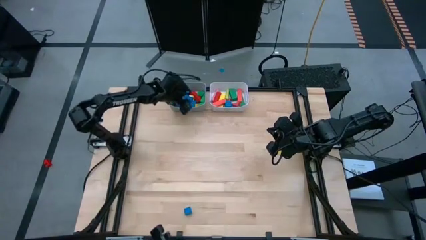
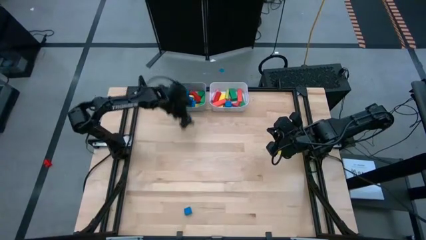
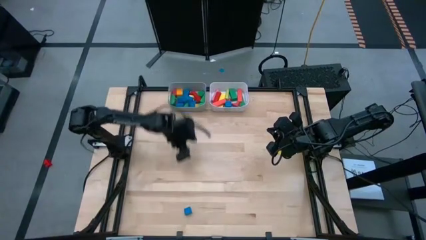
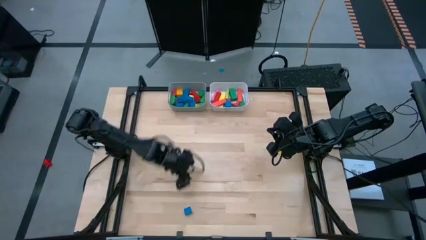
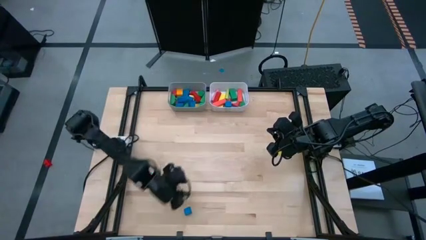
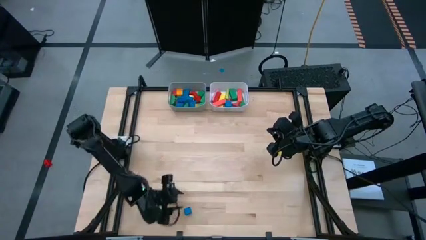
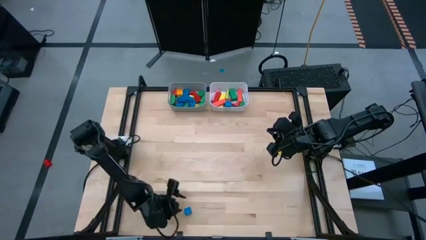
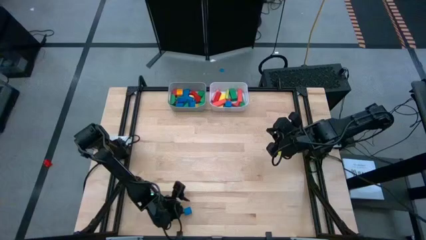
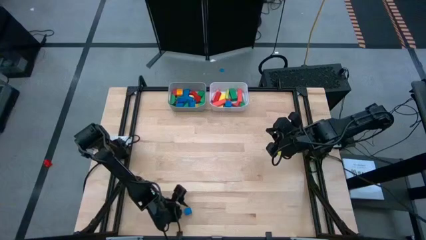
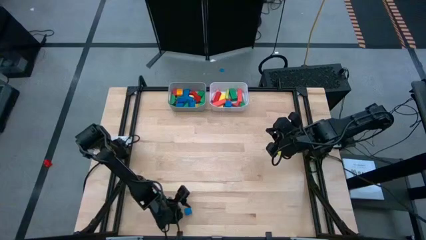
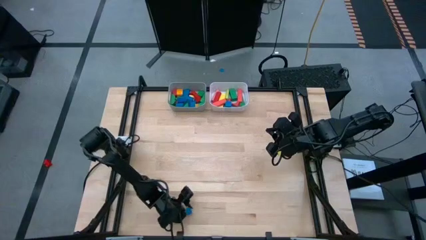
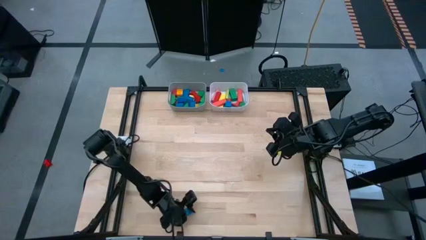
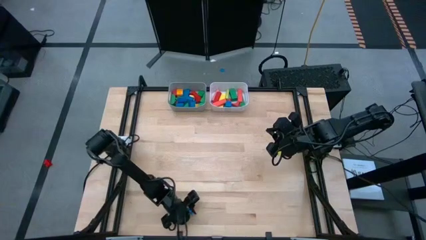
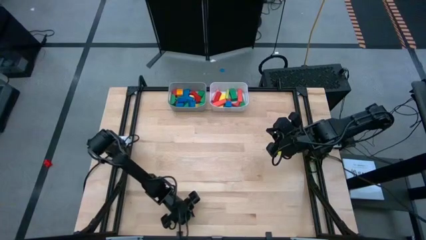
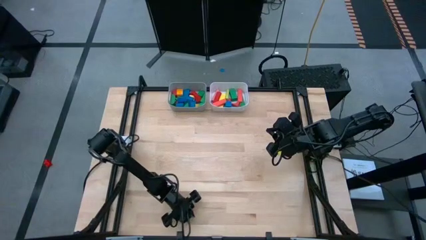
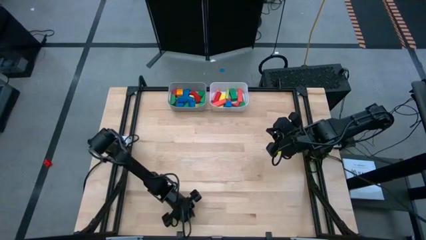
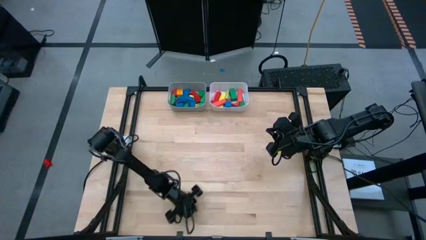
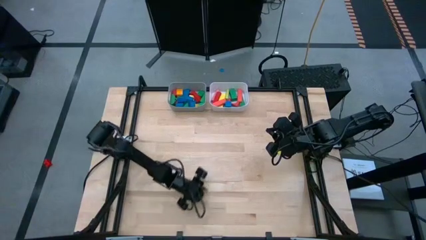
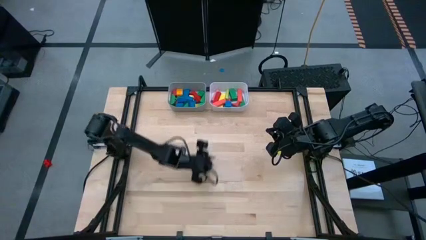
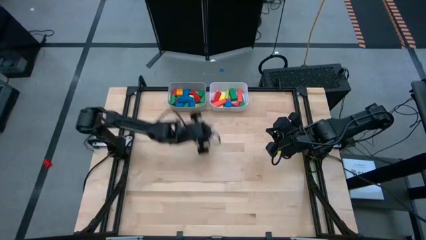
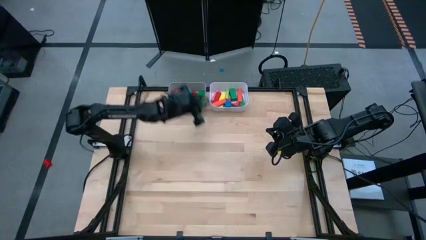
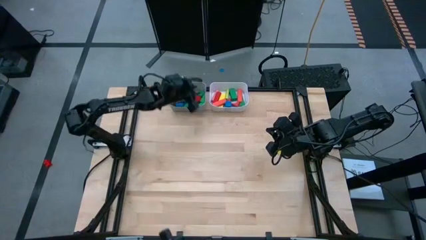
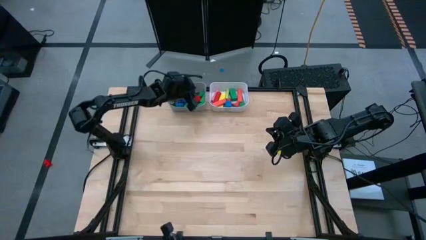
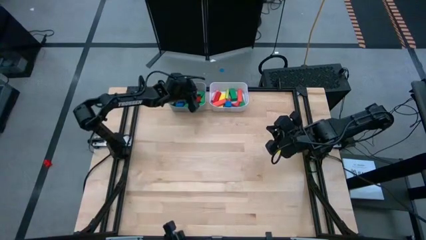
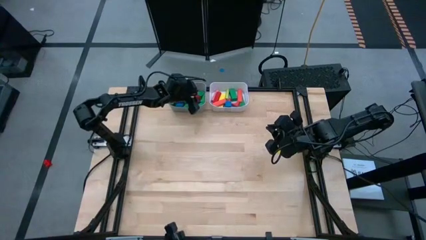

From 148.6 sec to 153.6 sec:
Task: Sort blocks by size
Put the blue triangular block into the gray bin

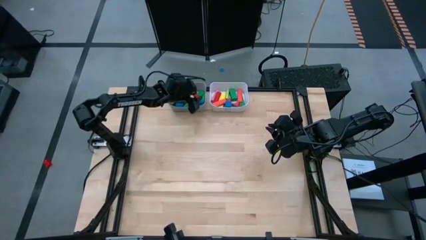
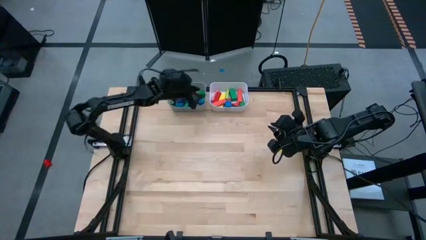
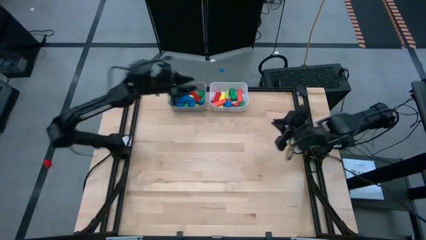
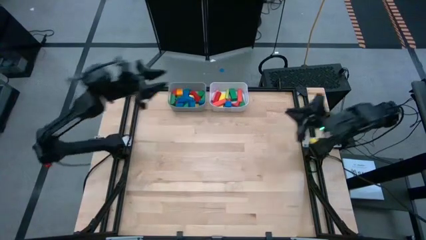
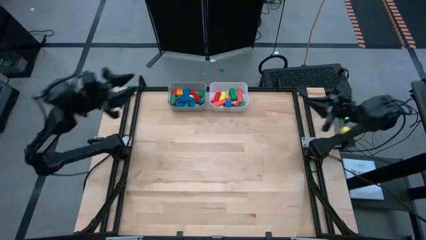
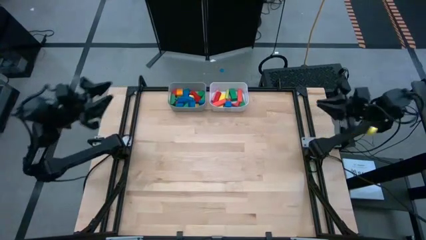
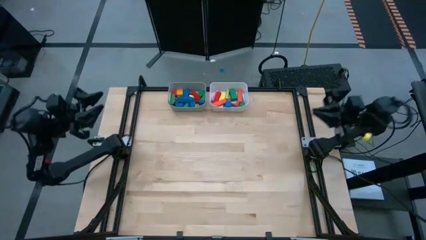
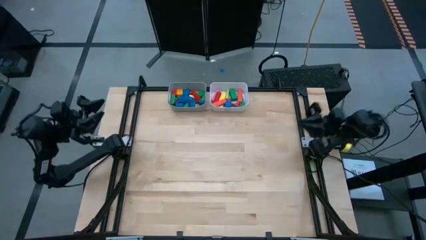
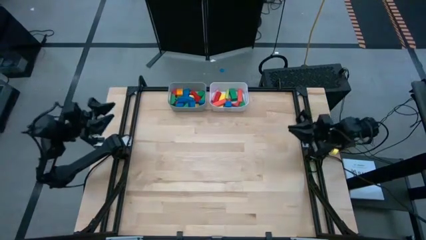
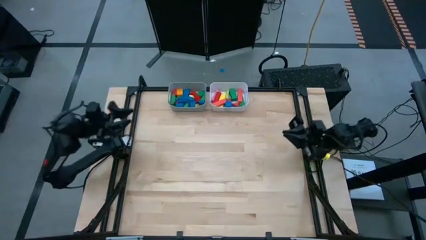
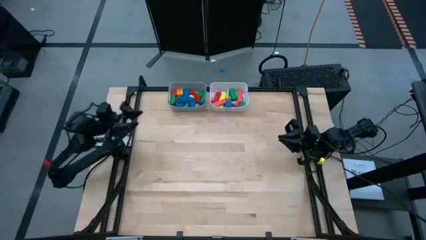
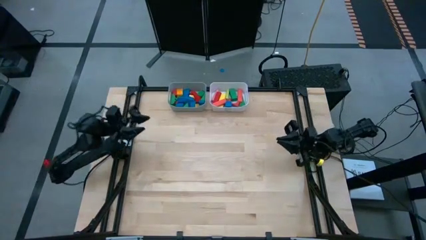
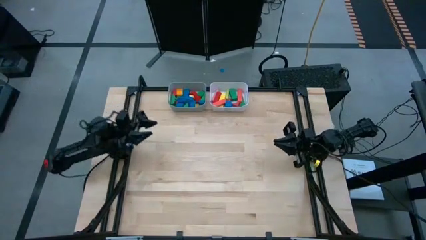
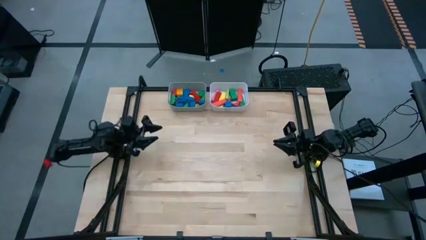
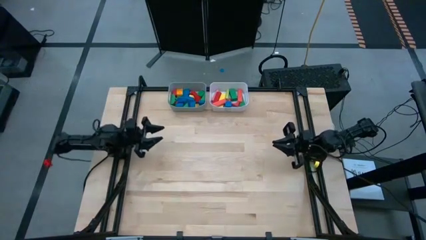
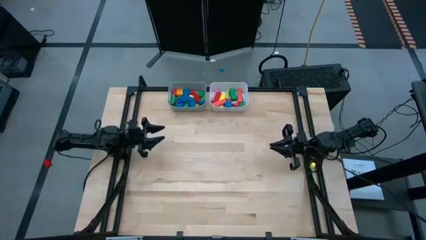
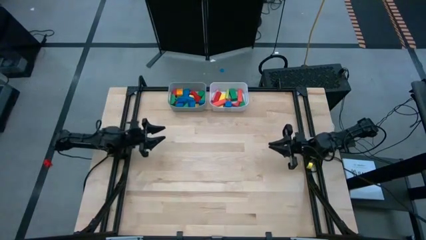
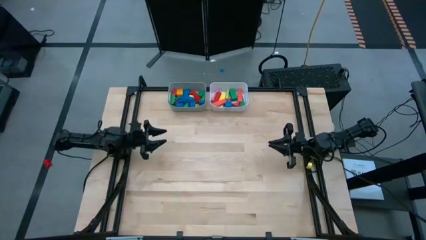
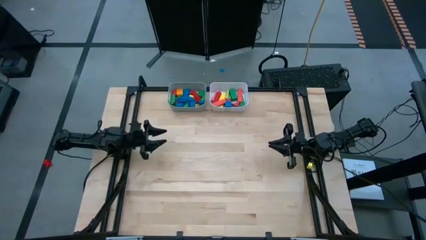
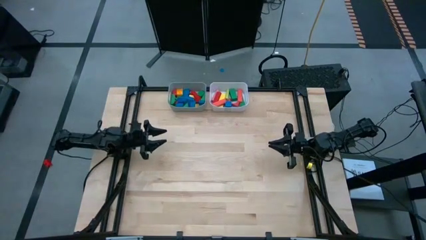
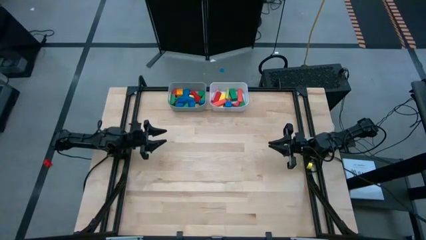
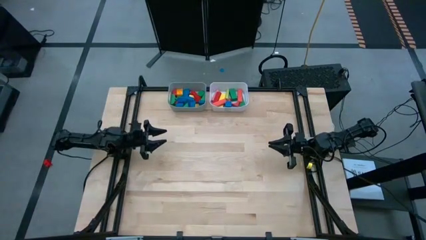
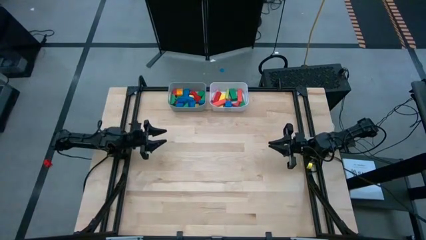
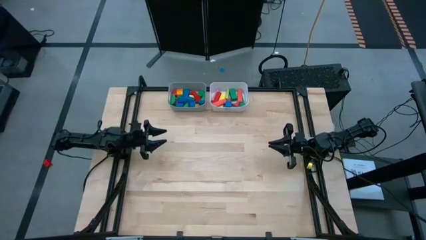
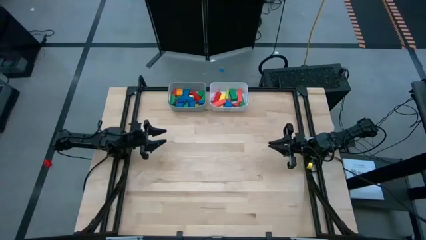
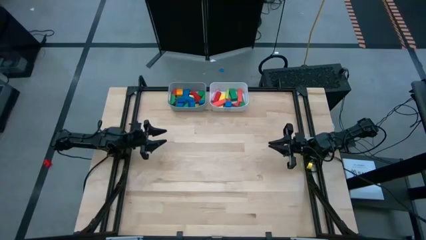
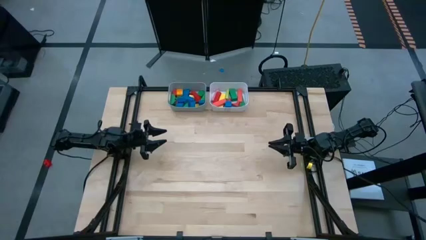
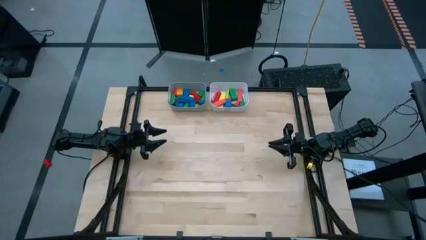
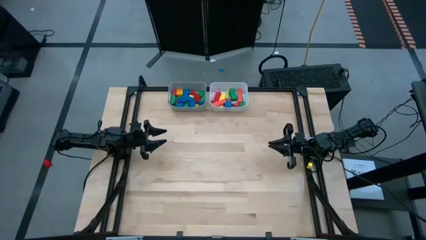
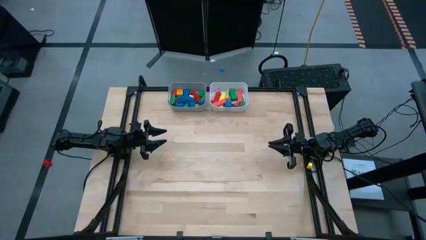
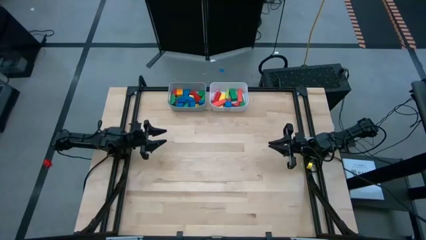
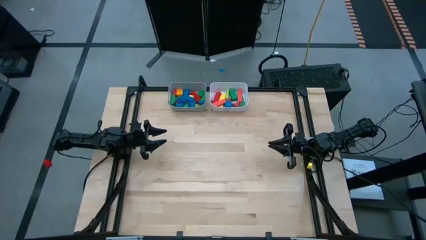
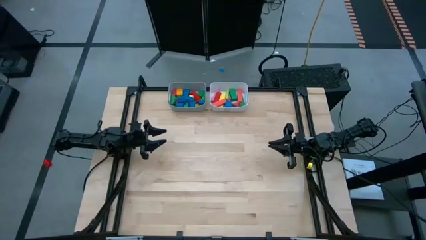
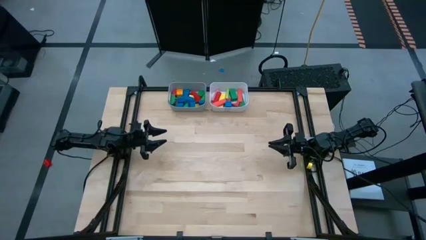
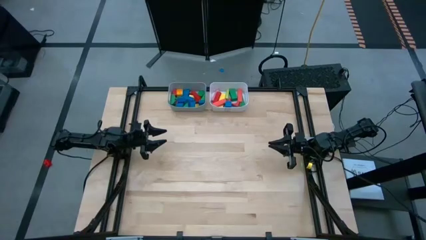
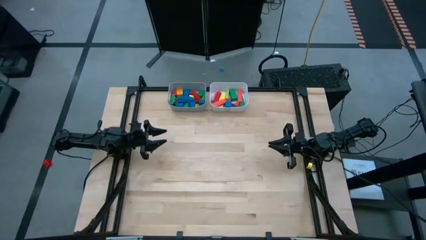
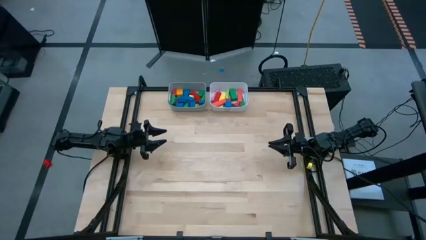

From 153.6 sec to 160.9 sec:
Return to Home Position
